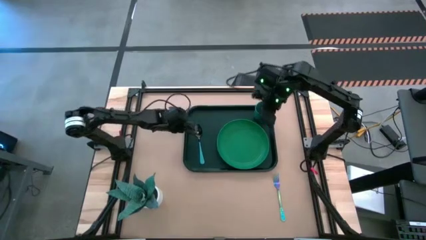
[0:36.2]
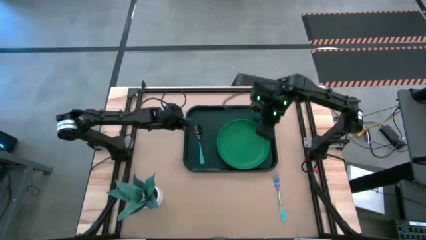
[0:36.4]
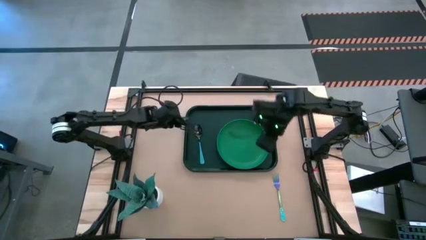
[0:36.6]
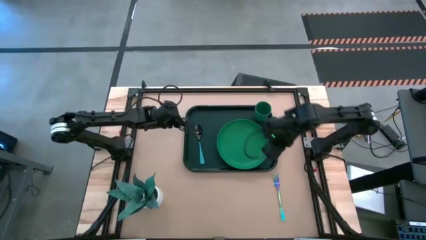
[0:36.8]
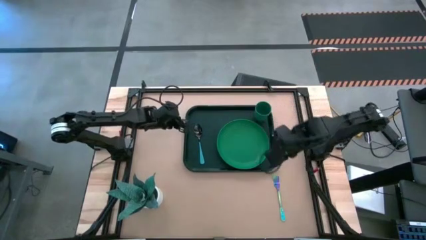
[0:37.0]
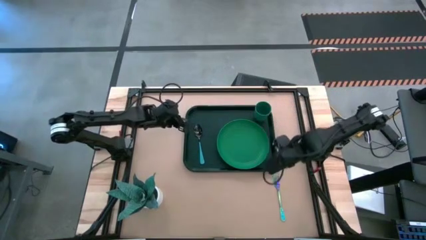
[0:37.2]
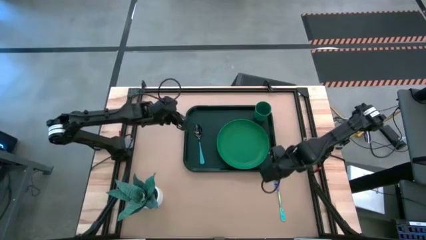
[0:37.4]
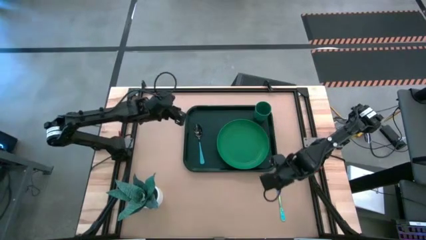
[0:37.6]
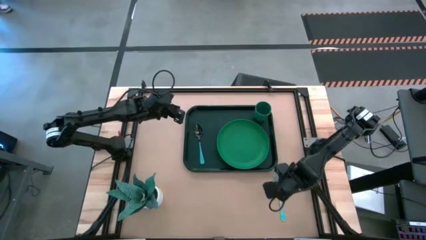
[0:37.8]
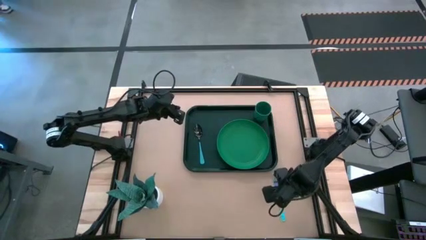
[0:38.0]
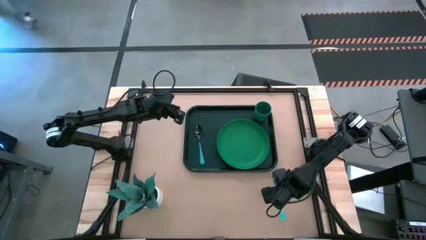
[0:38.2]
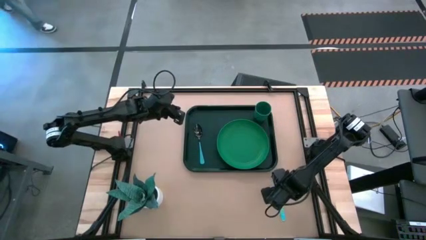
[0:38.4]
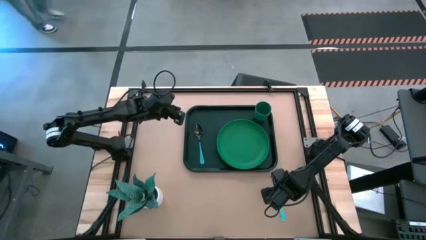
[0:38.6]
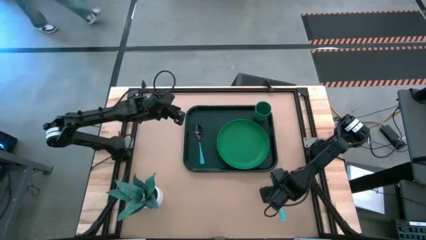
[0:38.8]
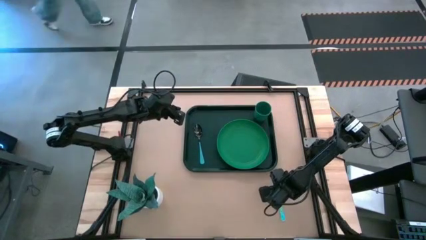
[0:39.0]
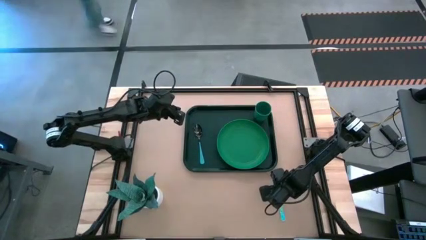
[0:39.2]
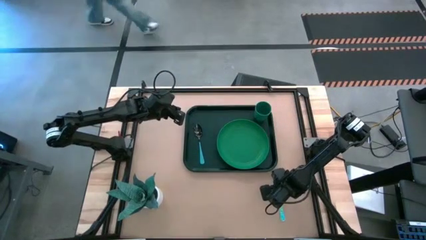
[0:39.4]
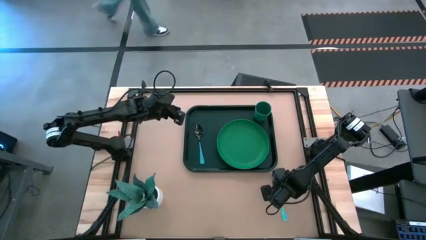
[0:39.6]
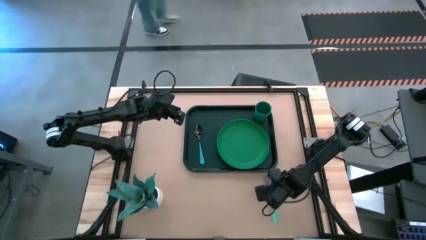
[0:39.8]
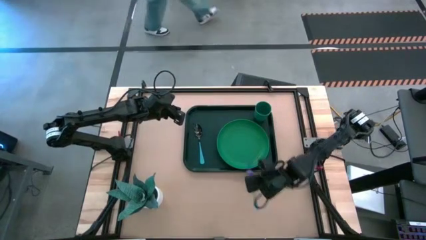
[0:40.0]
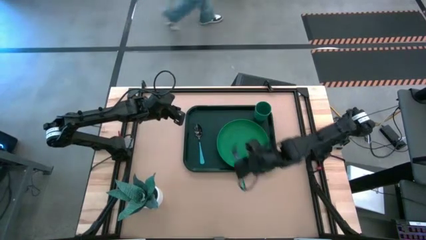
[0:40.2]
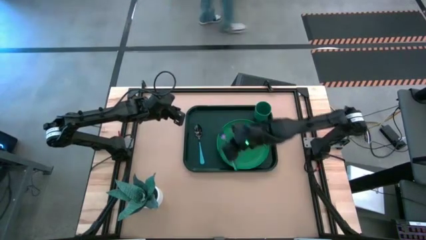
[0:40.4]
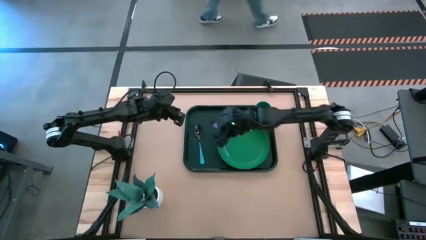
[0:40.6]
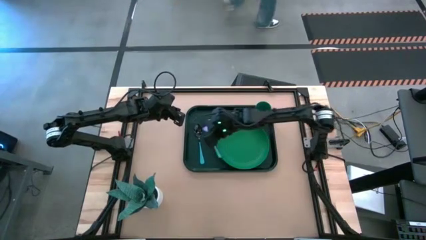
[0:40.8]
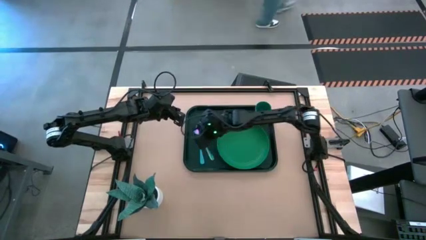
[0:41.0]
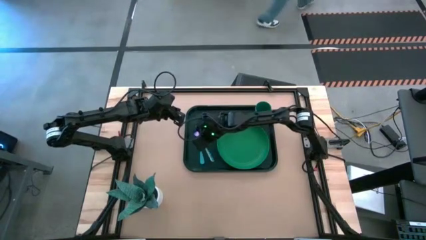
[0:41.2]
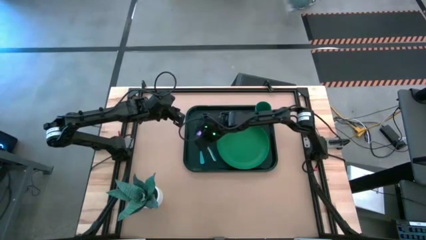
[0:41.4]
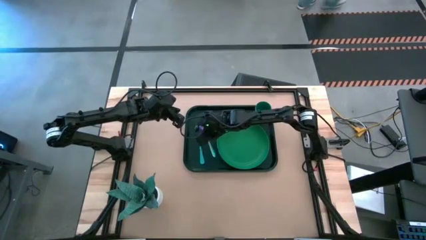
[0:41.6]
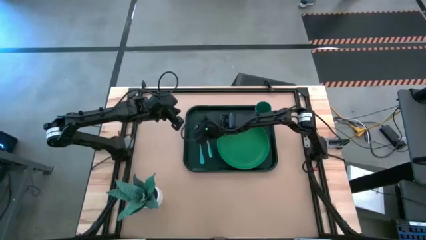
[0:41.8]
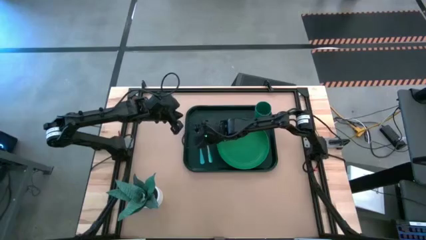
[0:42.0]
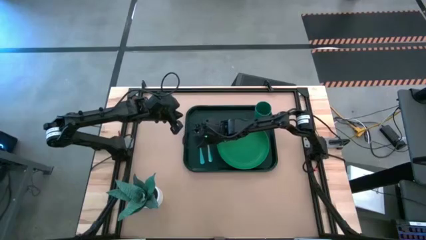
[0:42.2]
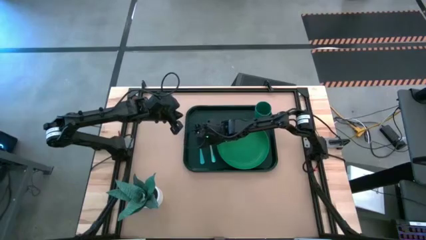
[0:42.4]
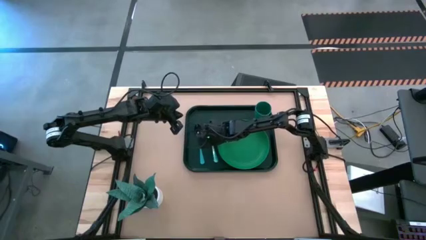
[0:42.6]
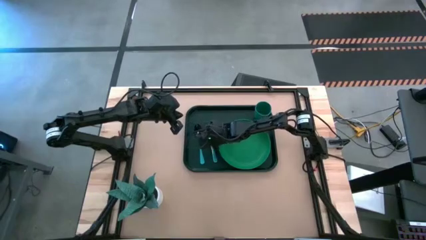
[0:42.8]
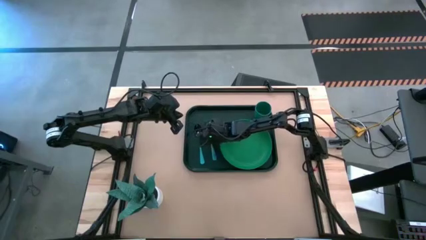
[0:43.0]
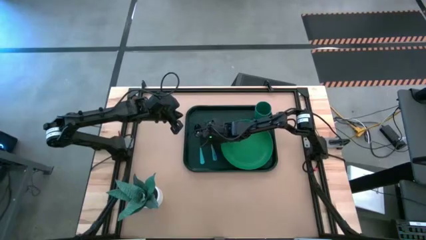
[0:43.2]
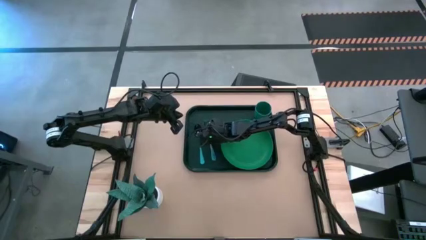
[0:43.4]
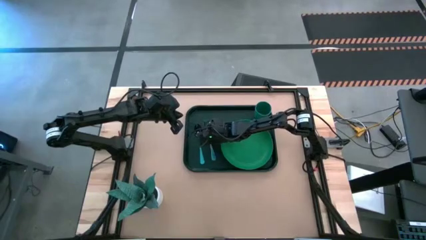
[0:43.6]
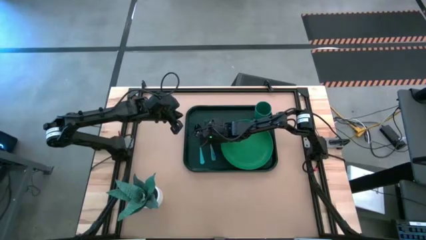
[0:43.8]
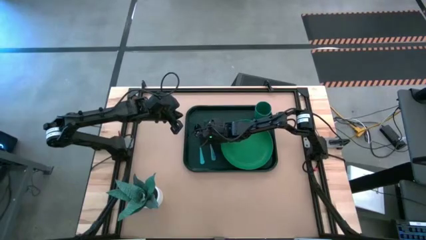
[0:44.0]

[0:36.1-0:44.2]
Task: Pick and place plate/cup/fork/spoon on tray
Put the blue fork on the dark green tray to the left of the green plate

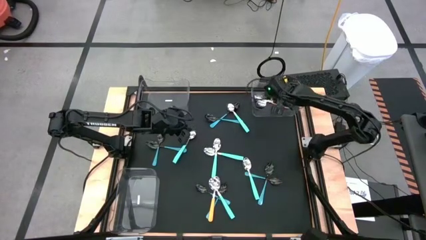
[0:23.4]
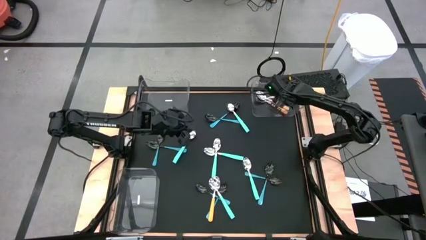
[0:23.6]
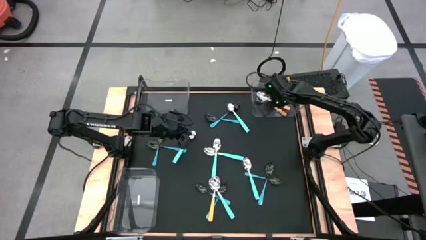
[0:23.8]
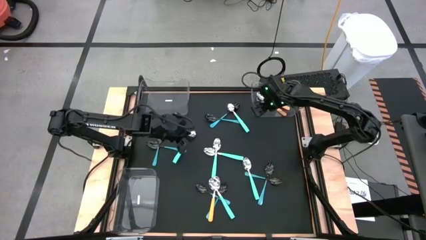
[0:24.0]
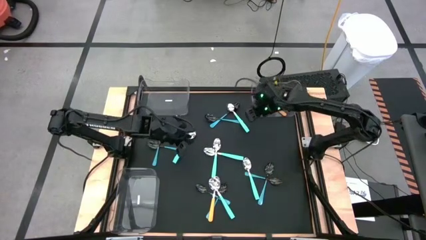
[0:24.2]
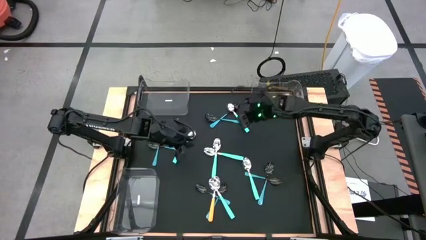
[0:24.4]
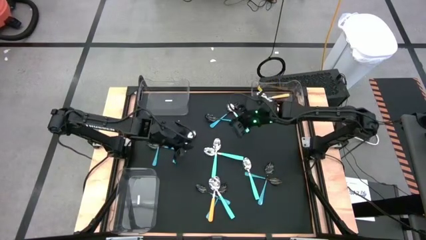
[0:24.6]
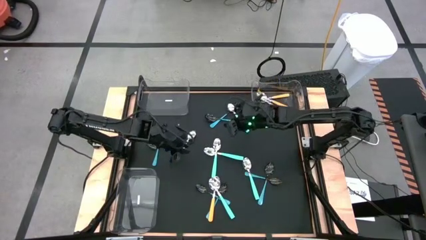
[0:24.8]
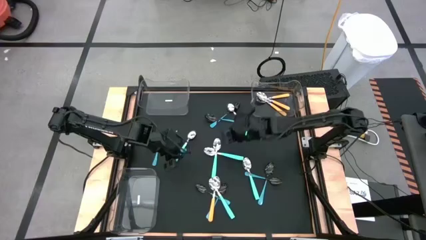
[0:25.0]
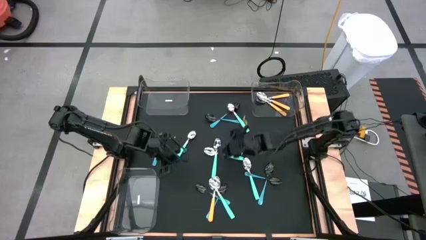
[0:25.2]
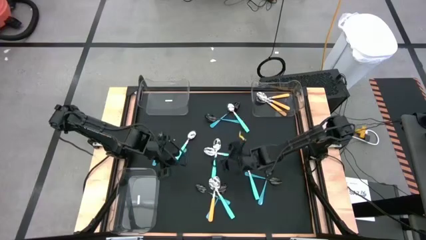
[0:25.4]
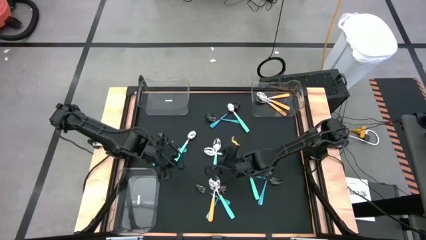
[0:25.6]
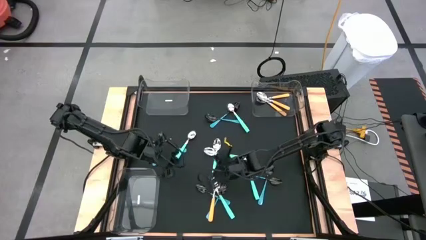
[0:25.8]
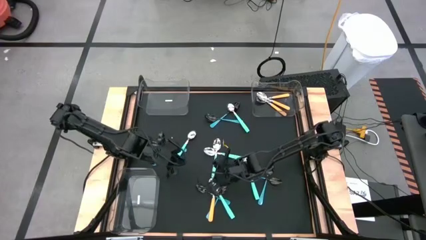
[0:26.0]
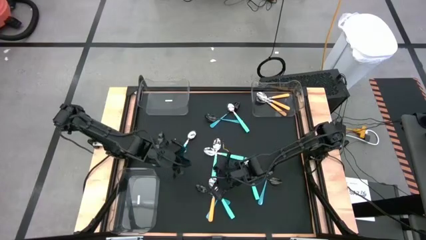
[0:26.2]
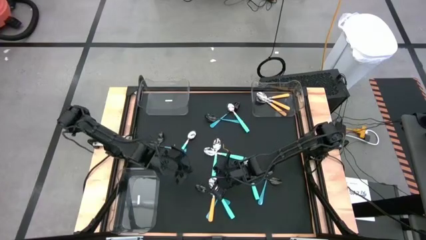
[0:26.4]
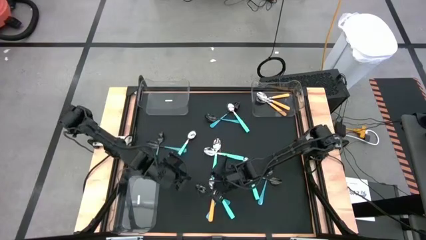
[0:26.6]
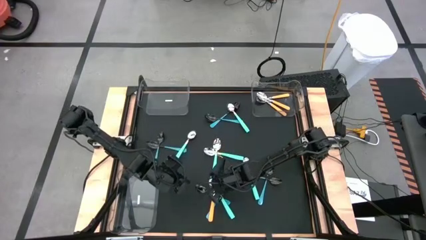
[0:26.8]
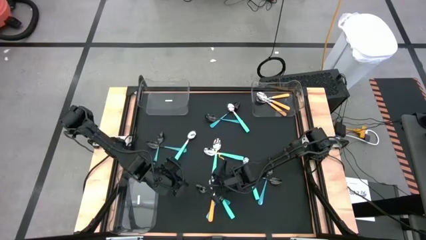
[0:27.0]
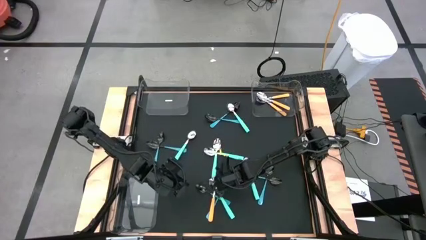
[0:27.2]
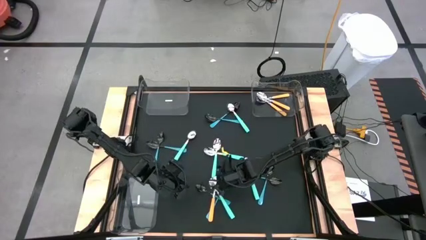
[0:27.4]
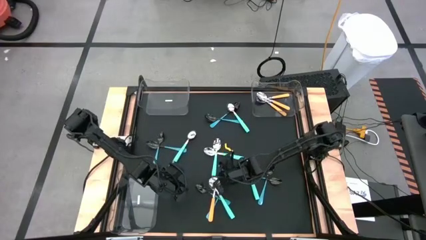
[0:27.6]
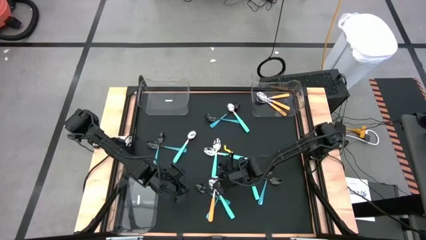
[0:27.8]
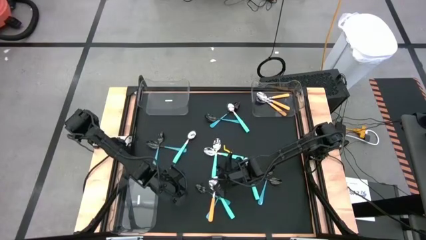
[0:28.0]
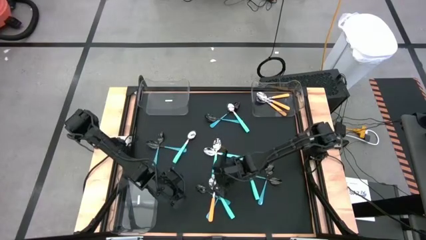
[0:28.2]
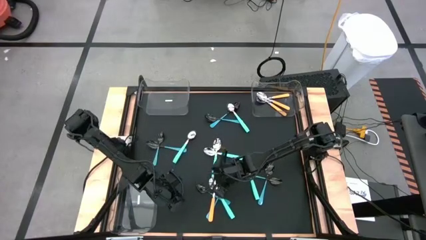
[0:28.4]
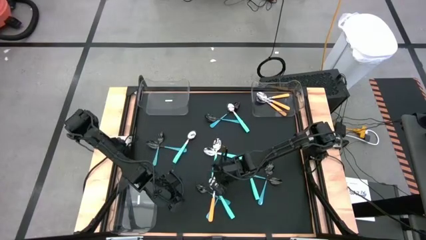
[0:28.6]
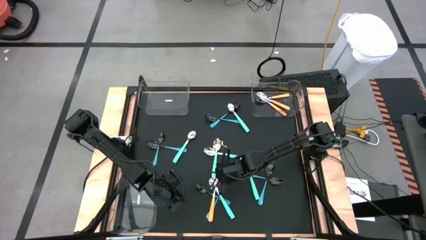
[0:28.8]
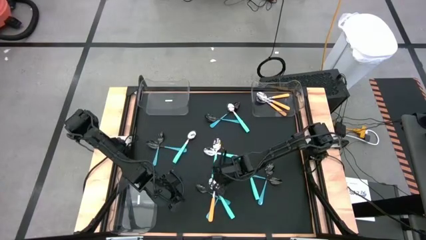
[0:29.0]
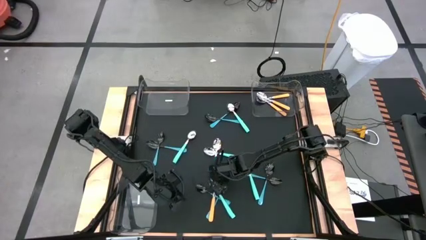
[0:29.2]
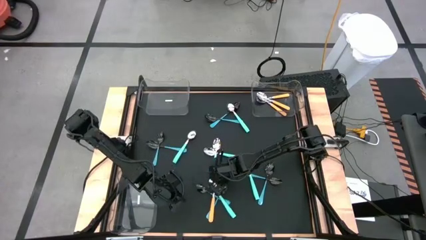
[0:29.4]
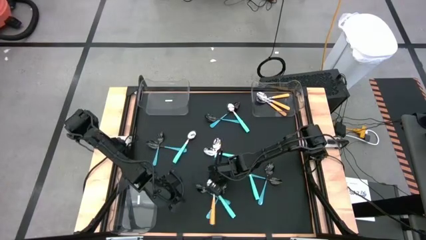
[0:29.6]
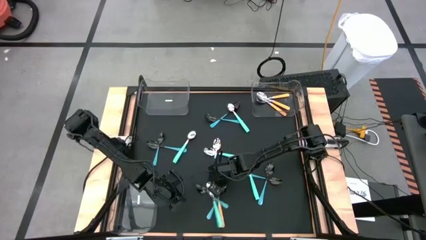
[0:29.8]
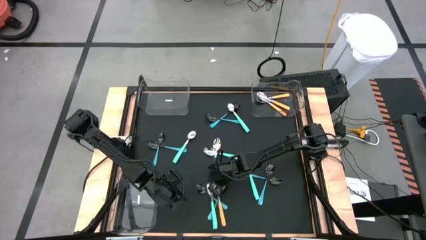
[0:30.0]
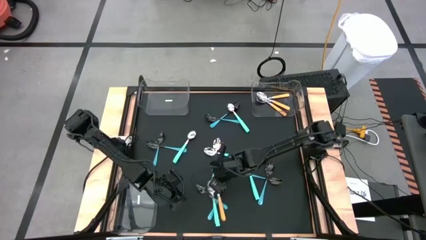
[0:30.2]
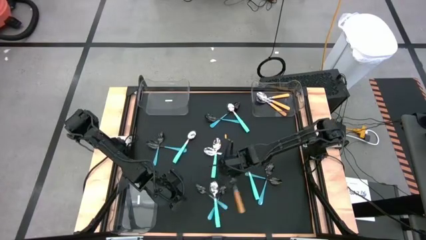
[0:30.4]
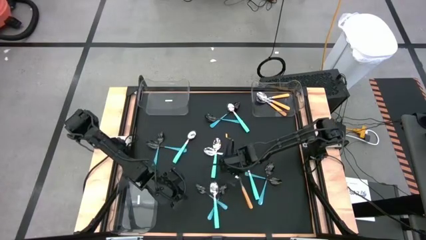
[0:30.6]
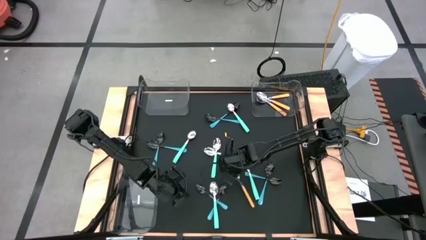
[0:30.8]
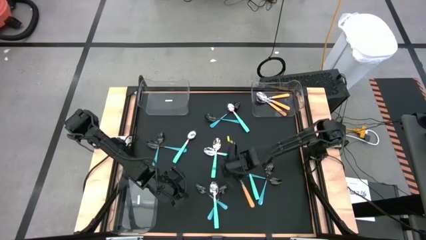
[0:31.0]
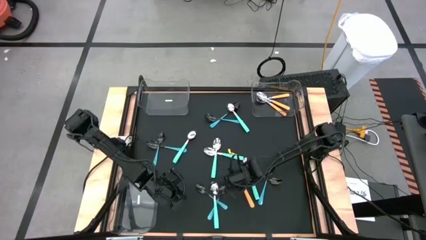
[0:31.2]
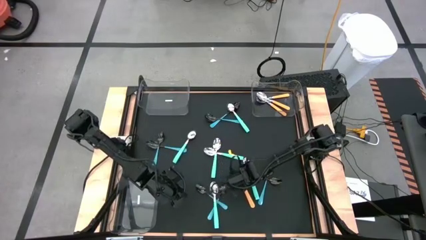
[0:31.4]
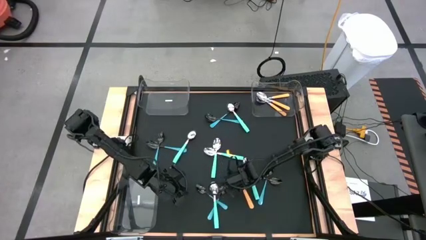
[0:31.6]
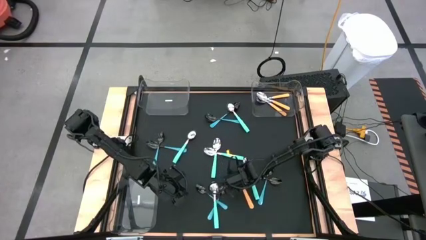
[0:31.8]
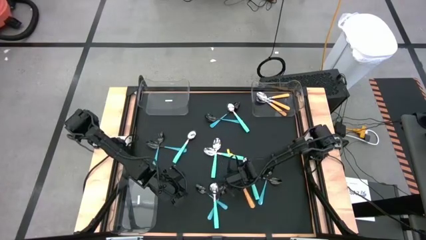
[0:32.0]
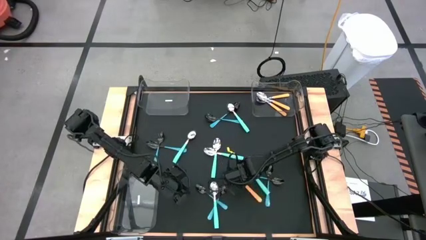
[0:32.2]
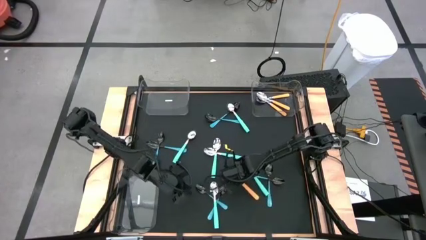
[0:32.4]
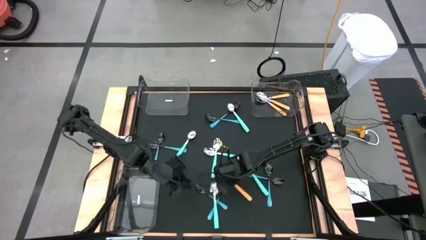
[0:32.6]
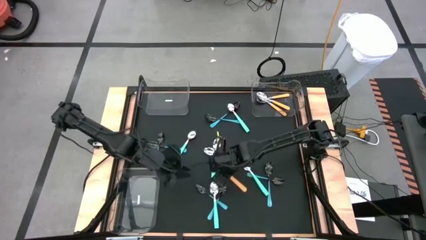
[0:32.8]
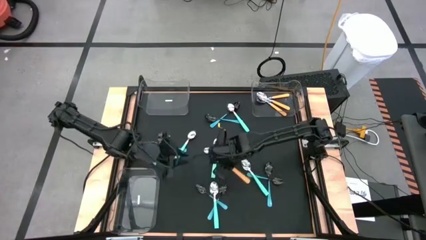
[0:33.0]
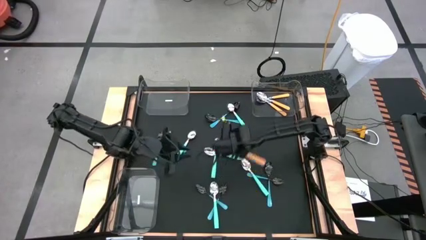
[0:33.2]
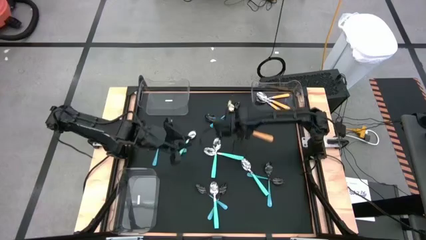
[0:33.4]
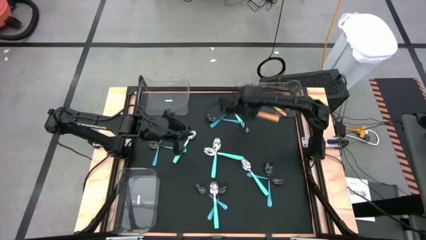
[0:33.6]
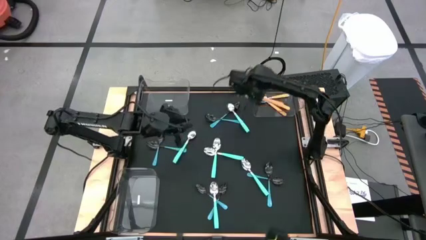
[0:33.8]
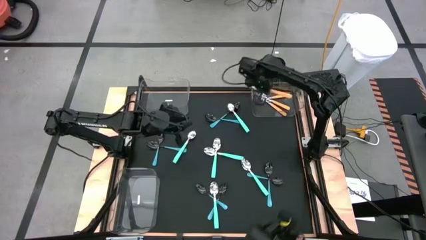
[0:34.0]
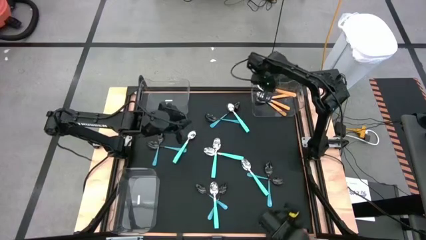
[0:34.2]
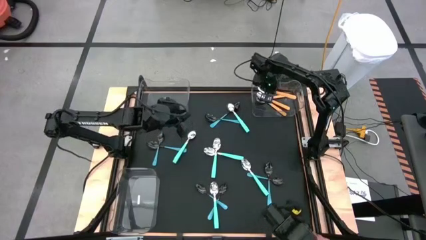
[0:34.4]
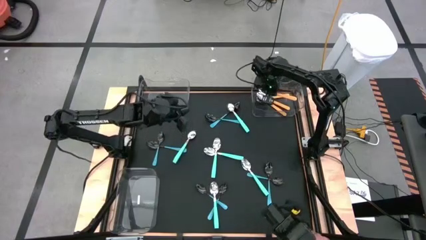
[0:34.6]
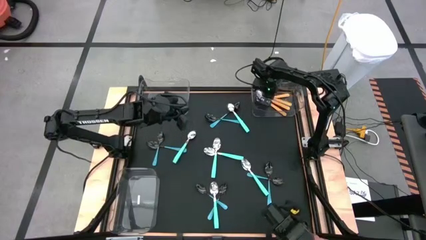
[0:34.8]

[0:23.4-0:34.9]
Task: Sort silverware by color (type)
Put the yellow spoon into the top right transparent bin
